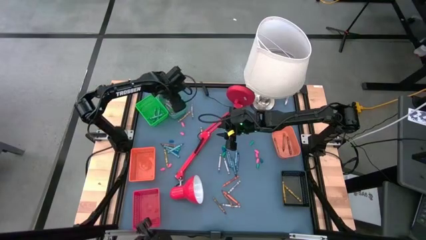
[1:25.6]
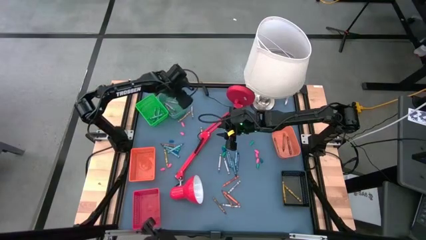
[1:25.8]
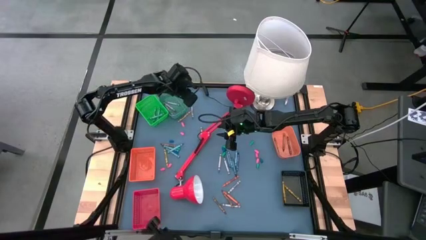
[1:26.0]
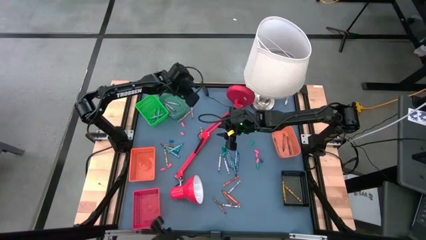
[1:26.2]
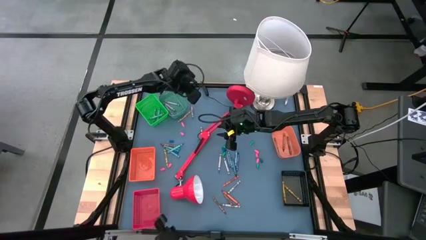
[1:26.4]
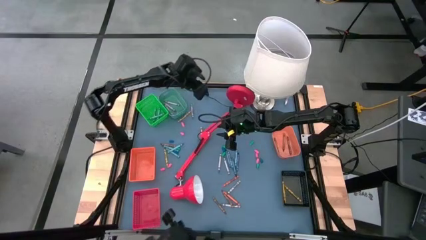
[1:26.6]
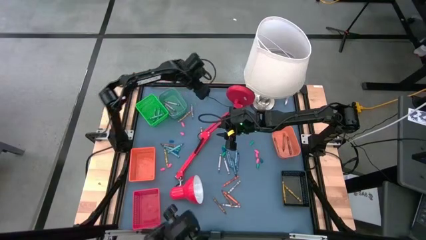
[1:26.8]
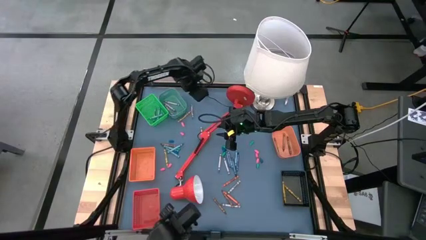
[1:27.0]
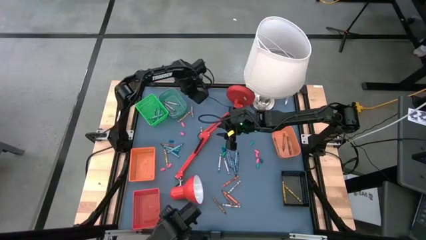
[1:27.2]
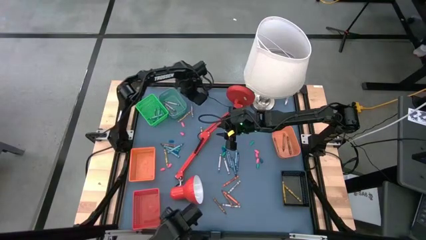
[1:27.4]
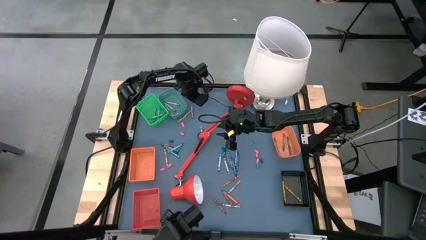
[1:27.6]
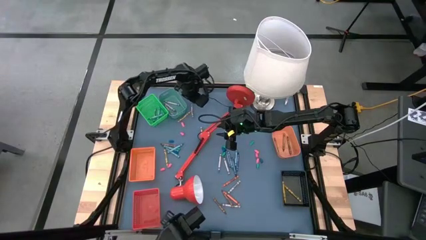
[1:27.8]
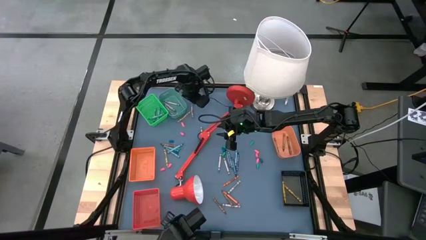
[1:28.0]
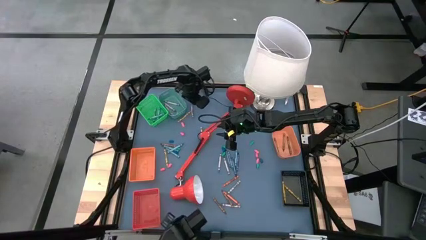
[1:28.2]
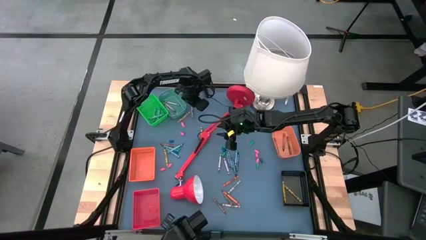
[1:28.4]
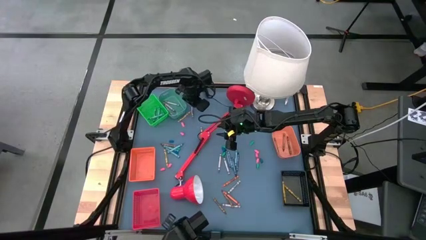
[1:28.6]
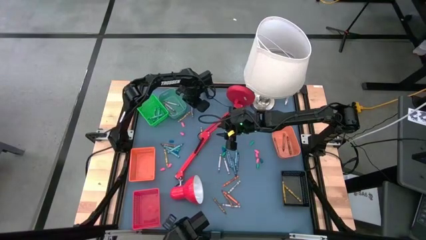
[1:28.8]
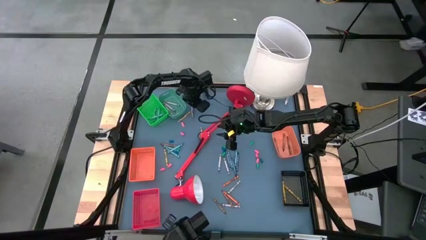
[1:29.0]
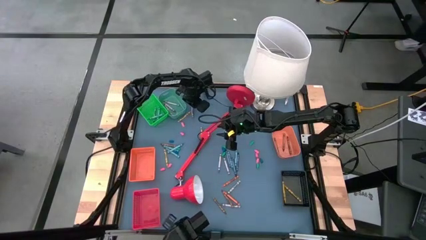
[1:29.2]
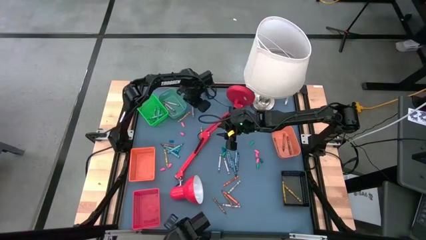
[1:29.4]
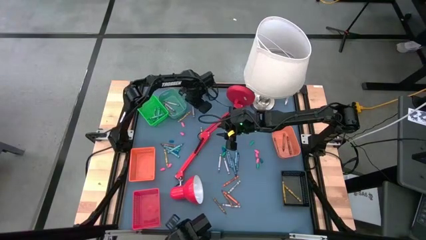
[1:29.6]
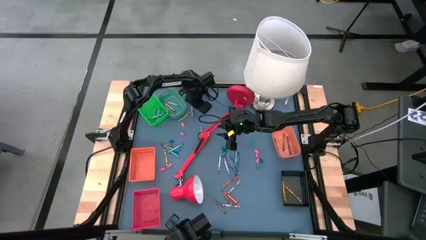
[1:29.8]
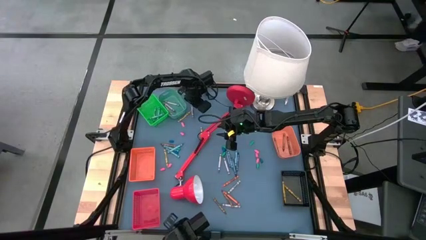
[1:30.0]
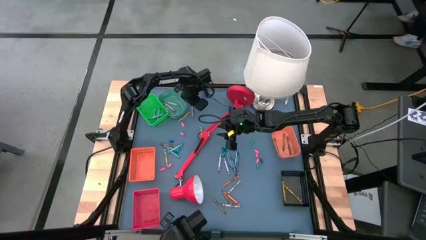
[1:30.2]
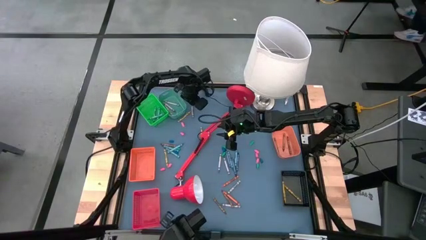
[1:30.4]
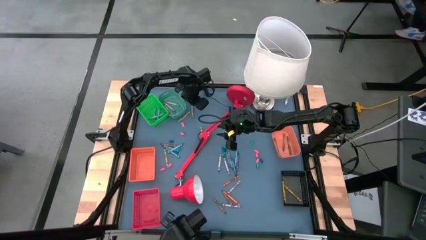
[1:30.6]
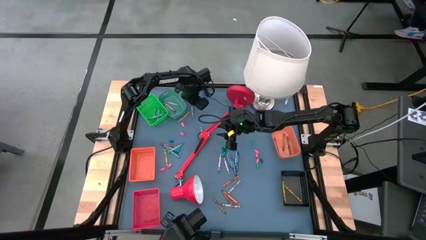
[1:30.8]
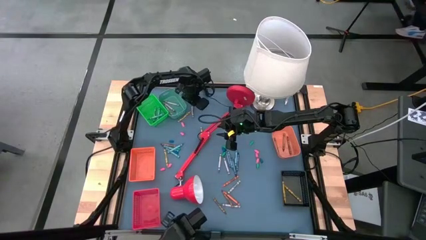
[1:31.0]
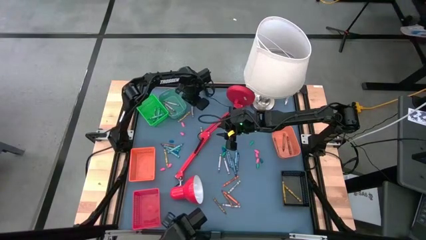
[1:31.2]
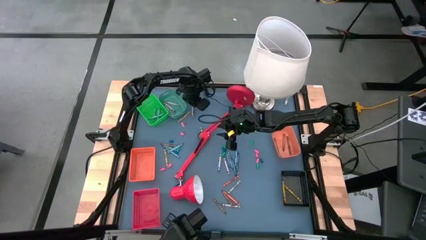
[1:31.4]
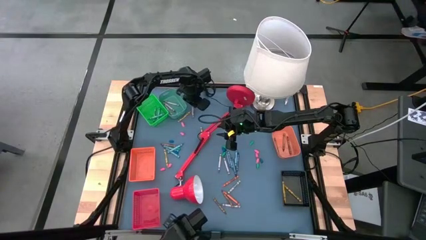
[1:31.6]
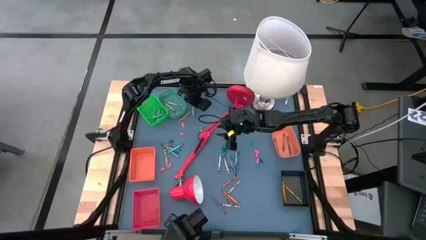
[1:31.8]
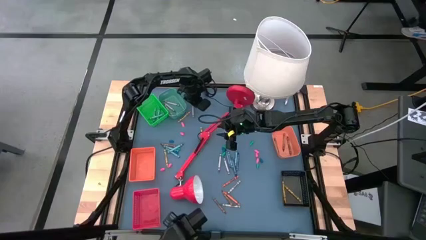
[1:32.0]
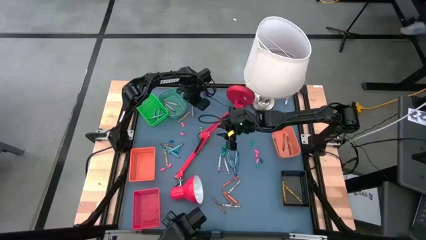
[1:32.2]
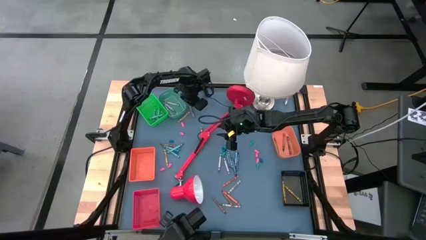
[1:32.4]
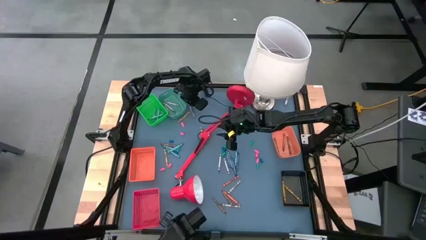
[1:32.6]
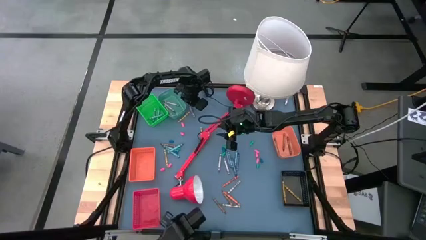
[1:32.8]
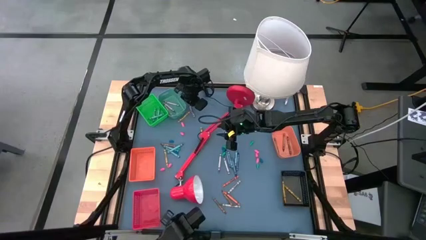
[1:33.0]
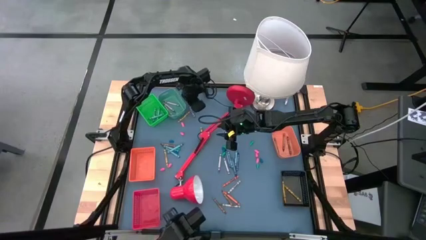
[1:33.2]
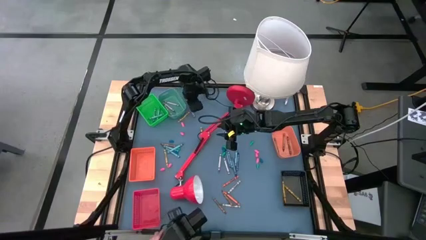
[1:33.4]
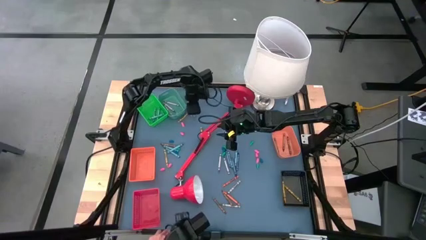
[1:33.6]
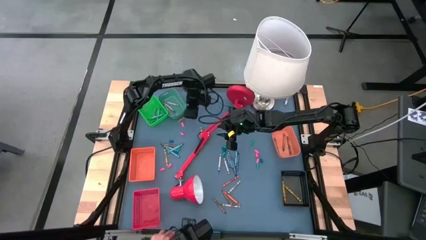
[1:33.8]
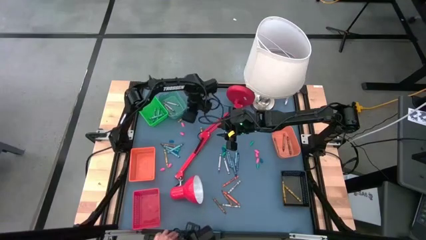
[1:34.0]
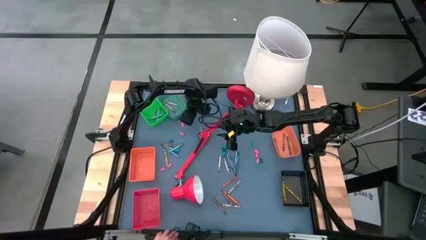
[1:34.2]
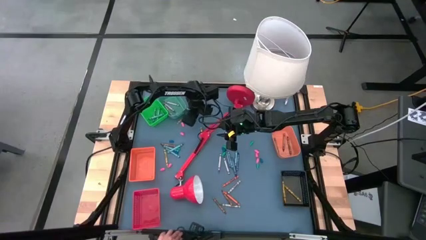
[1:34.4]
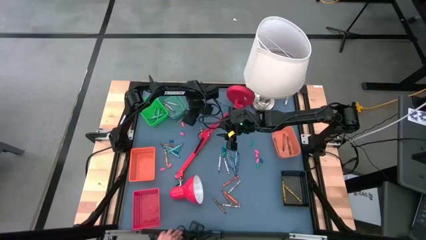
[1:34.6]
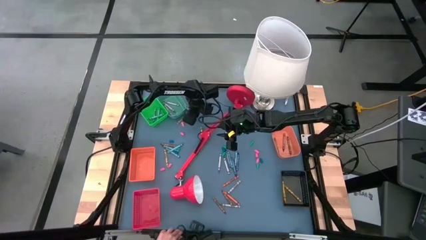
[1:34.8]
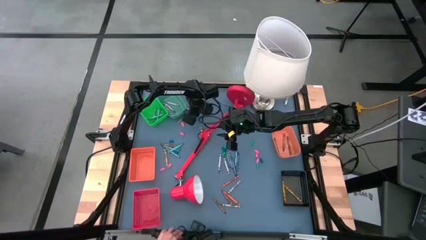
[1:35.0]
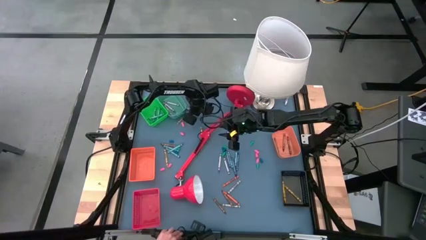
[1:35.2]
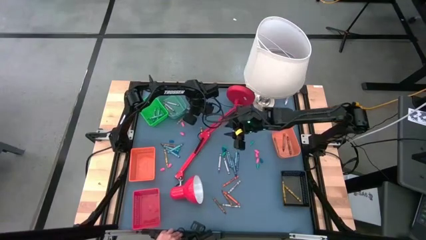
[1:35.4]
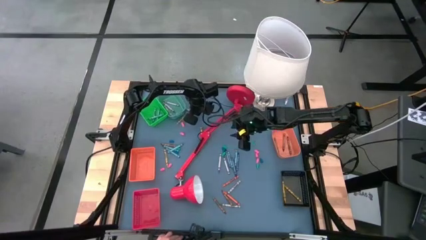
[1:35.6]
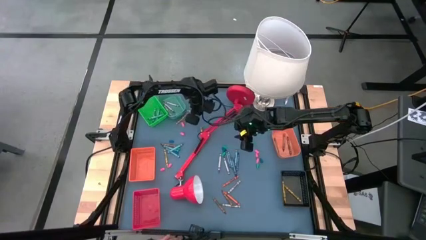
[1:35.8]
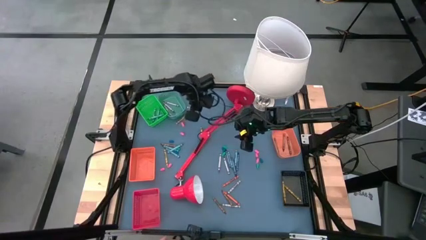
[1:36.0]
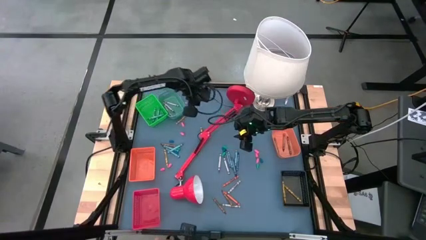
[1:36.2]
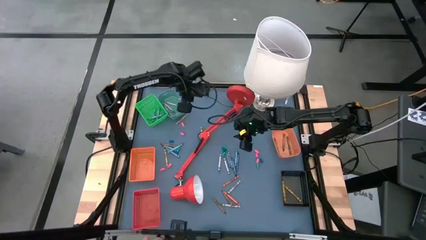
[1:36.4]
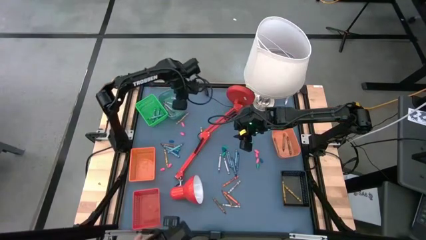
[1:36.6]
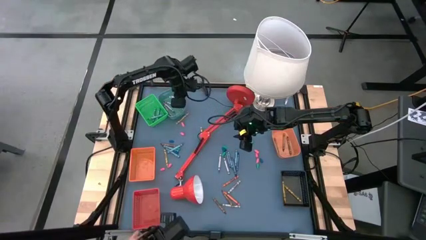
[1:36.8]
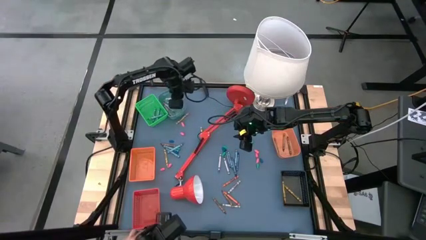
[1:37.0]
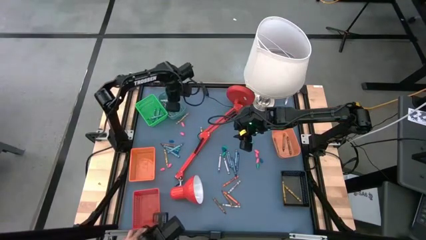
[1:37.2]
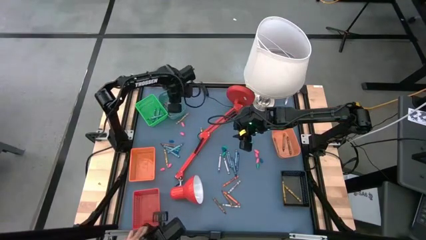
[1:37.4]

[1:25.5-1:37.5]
Task: Sort crayons
Put the gray crayon into the blue bin

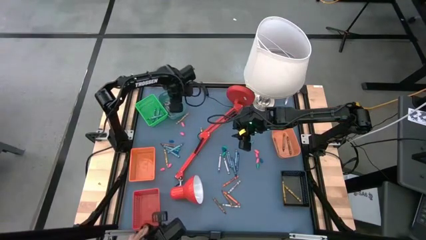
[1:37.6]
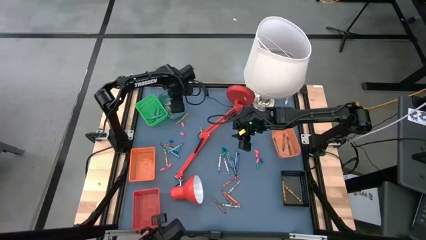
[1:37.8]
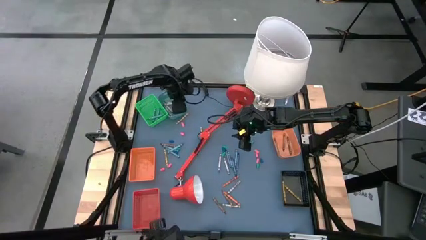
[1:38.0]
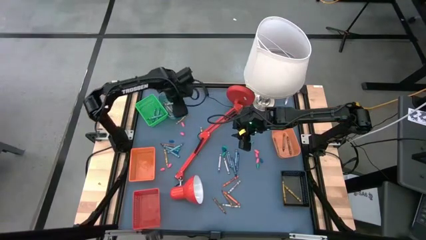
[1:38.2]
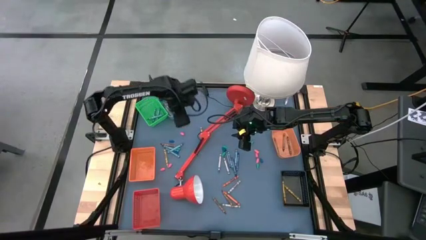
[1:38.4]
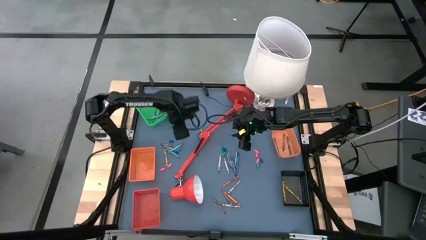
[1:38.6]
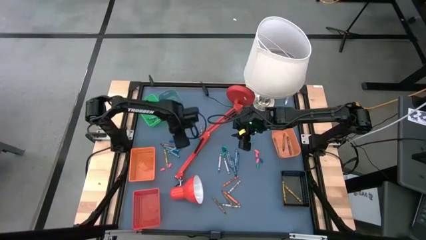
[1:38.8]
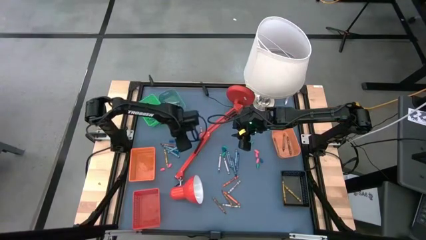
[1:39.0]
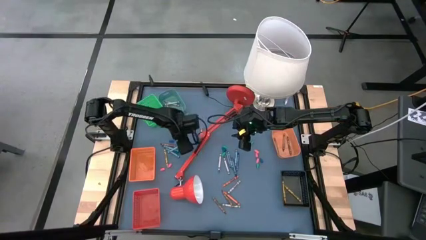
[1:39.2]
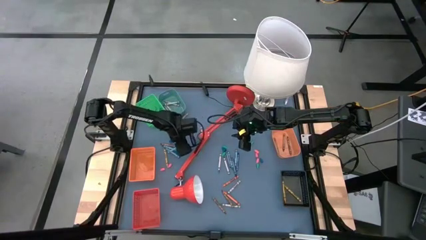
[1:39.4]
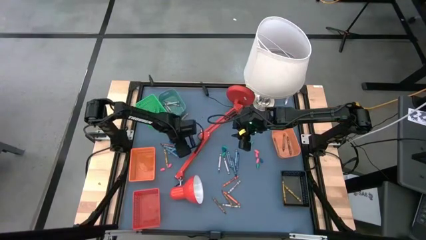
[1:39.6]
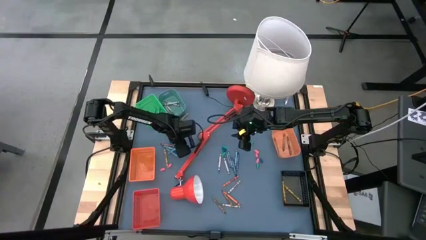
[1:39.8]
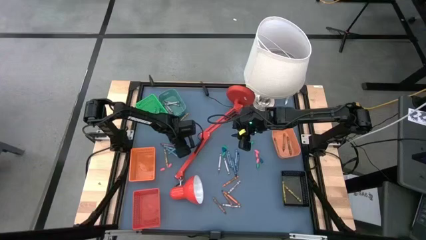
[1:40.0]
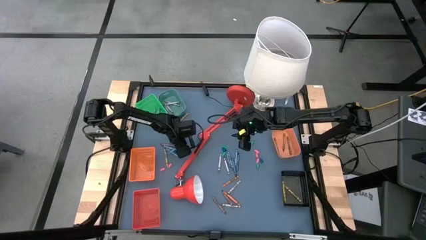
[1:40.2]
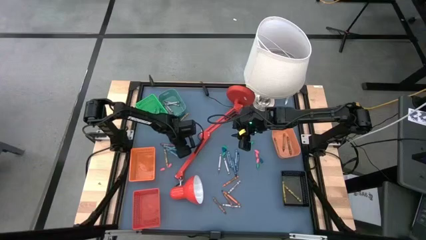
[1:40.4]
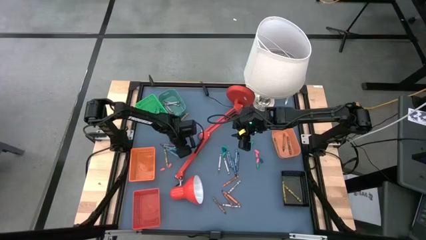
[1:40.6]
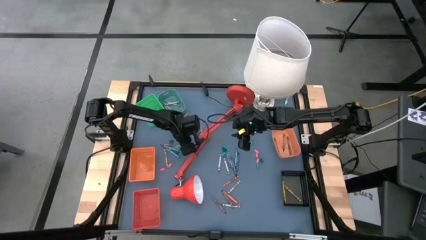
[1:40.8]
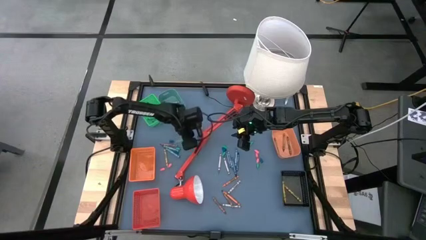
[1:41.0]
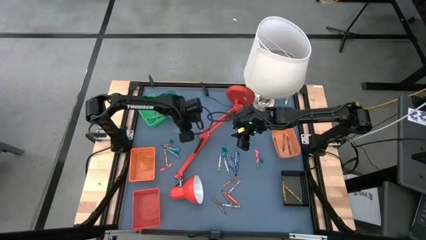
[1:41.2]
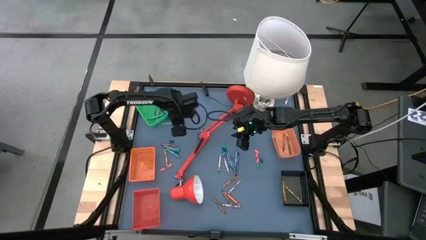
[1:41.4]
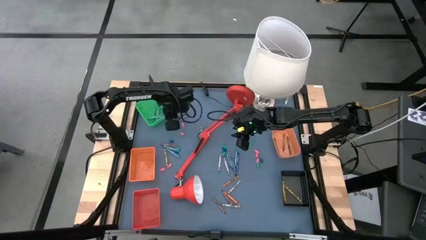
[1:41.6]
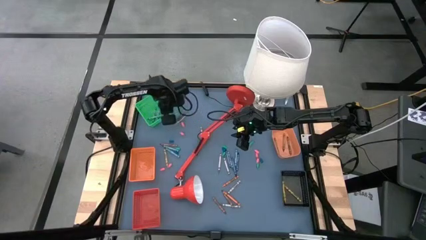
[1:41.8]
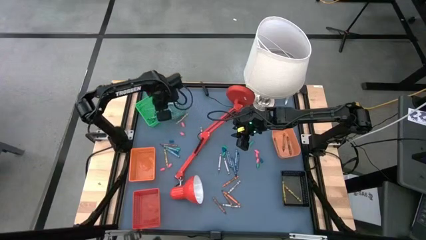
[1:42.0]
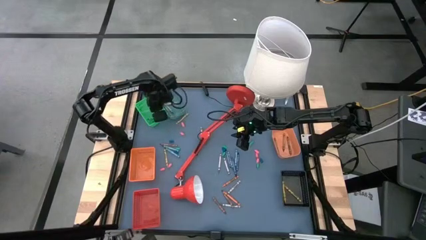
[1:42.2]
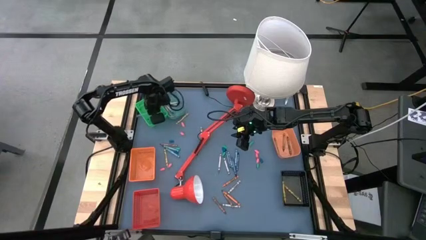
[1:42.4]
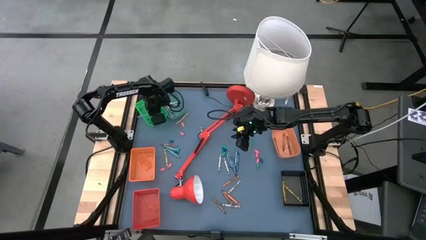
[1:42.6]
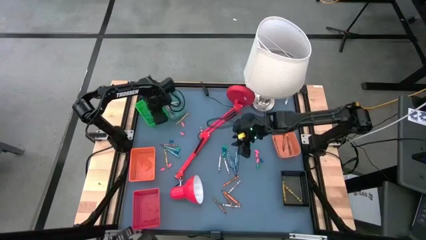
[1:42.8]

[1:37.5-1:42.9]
Put the green crayon into the green bin
